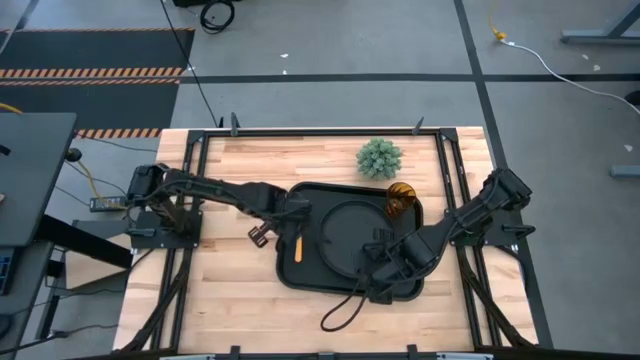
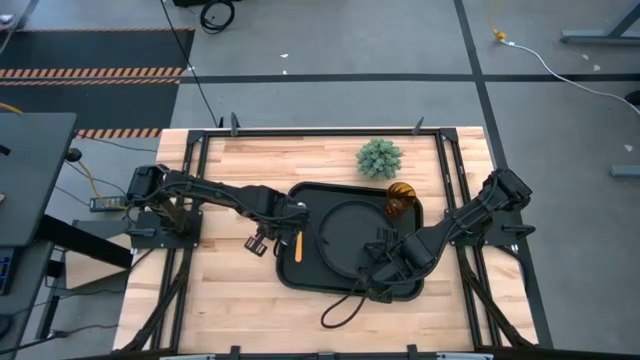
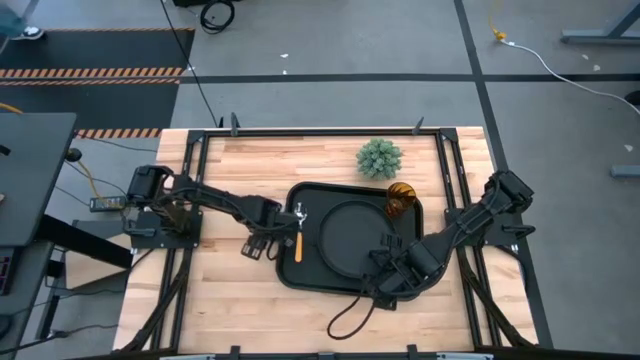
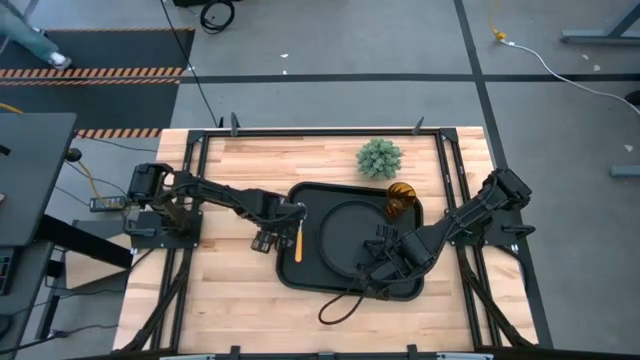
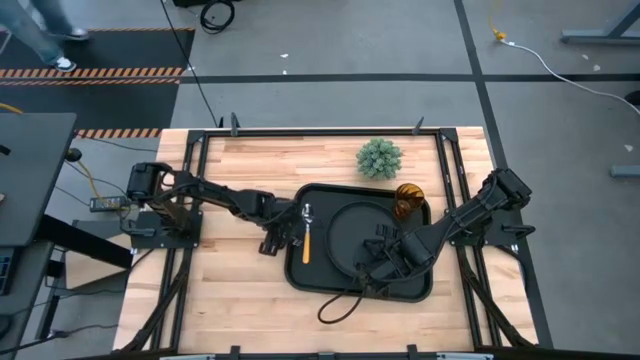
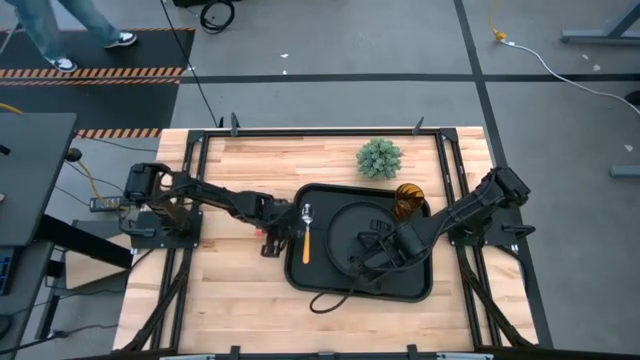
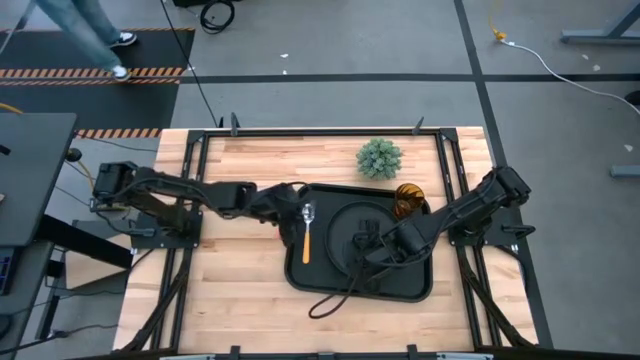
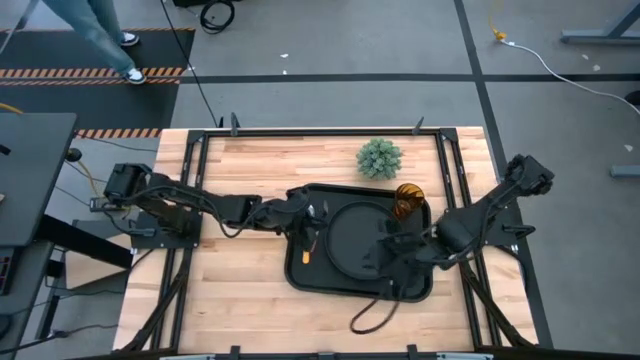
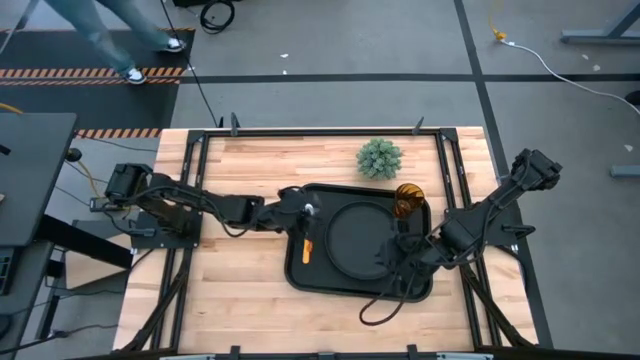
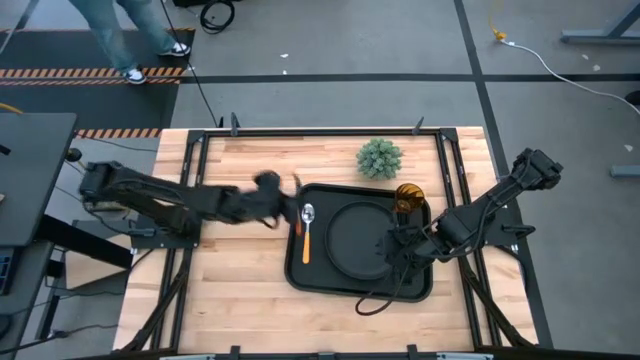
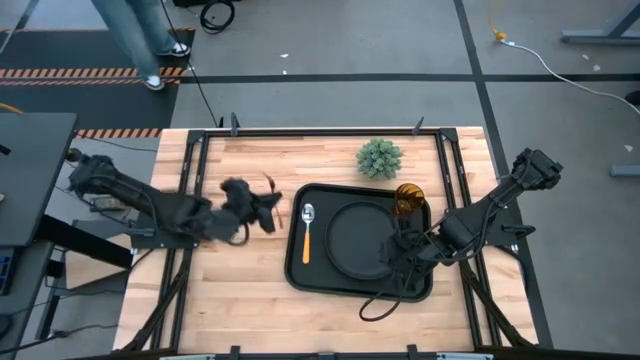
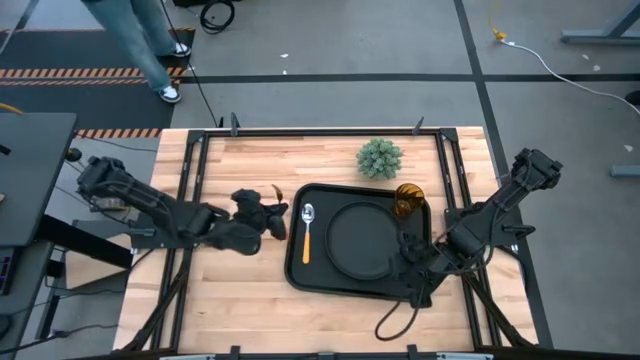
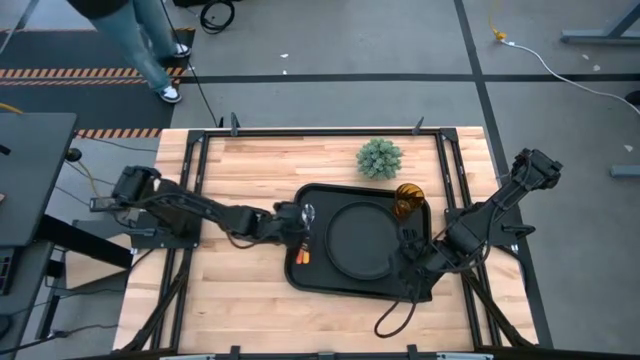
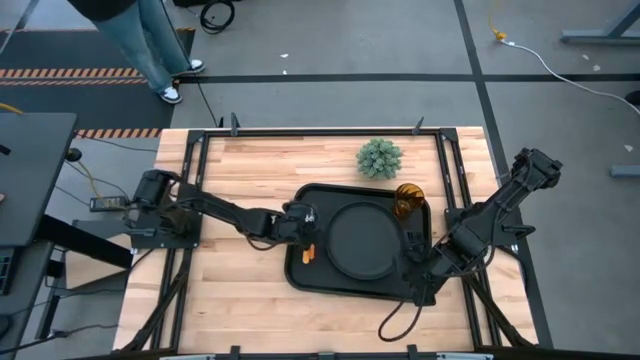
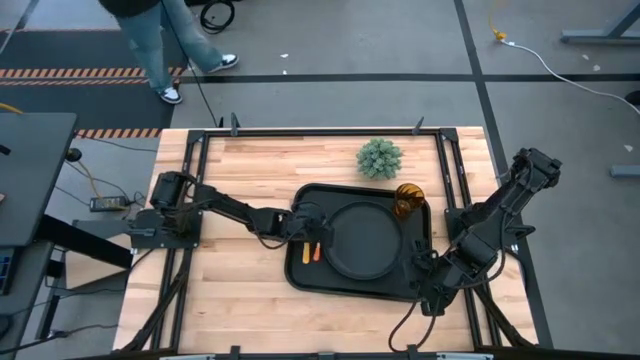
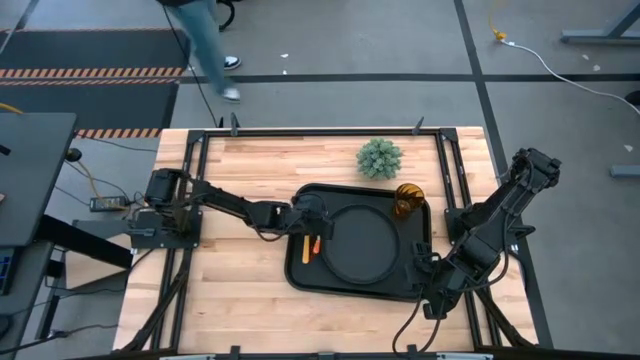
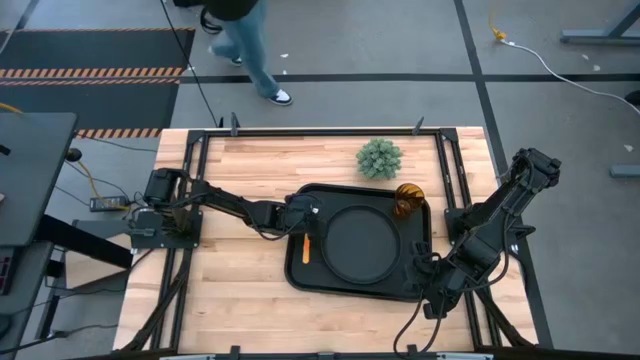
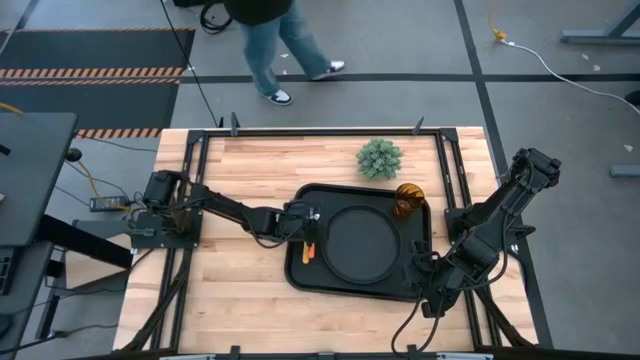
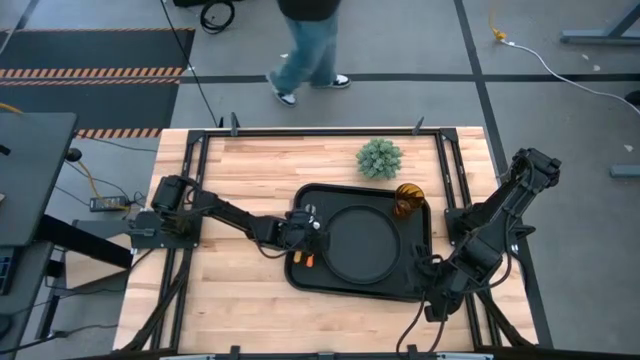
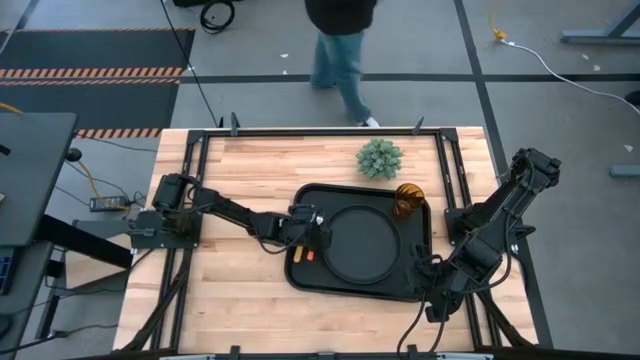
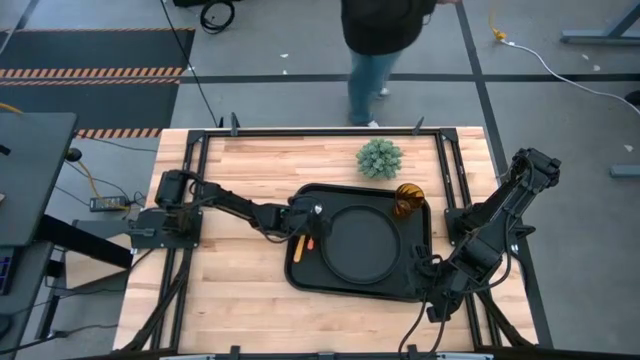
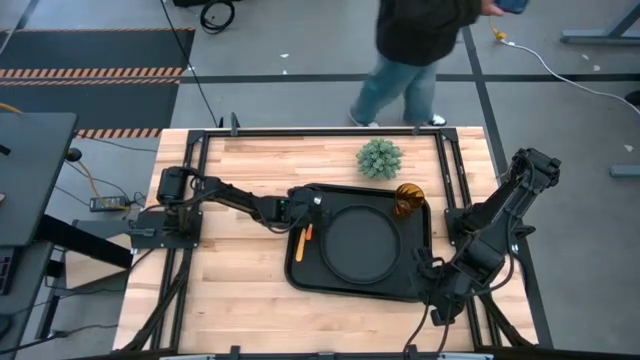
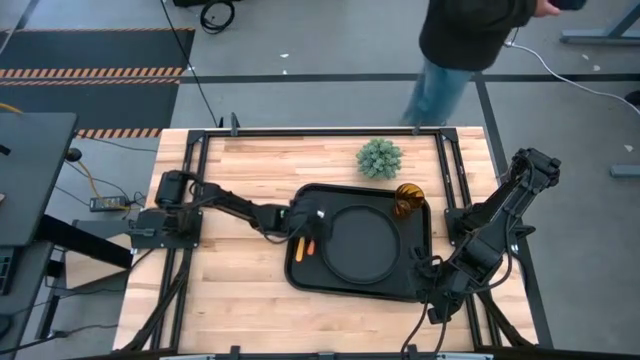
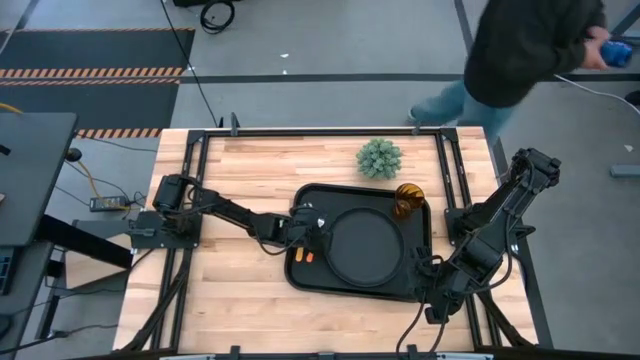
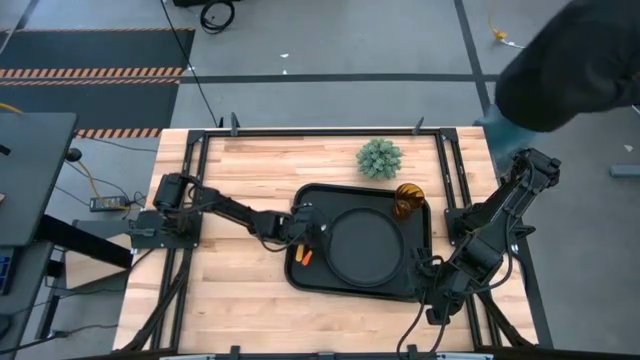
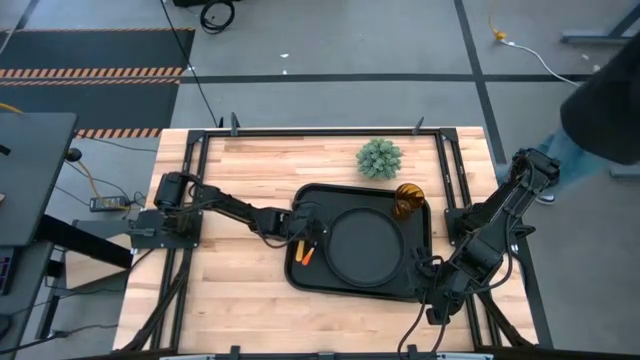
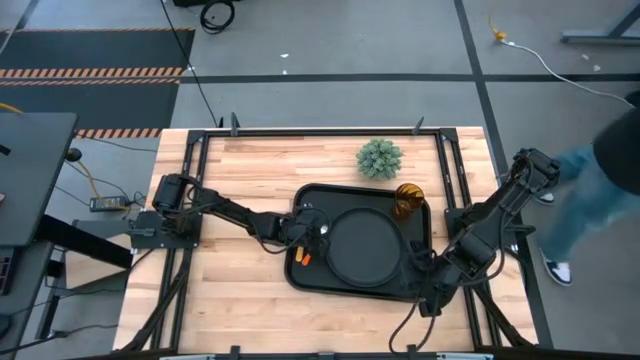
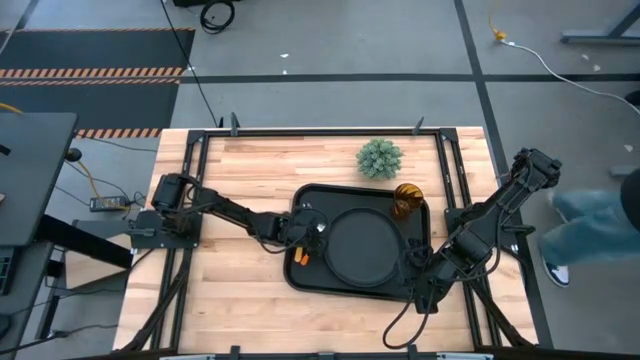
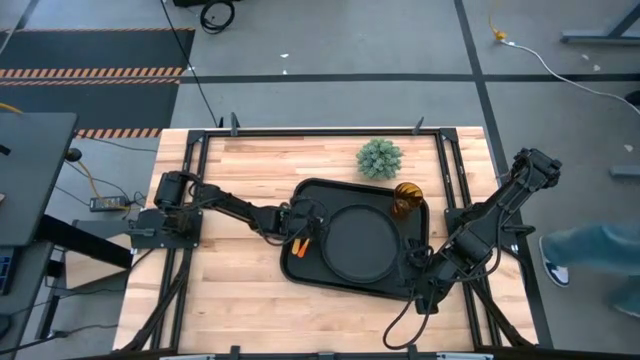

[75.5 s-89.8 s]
Task: Pick and place plate/cup/fork/spoon on tray
Put the orange fork on the black serving tray
